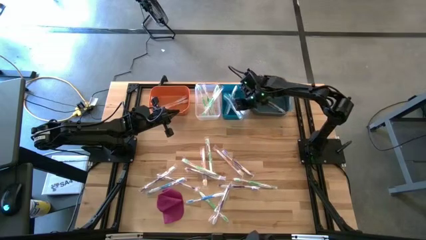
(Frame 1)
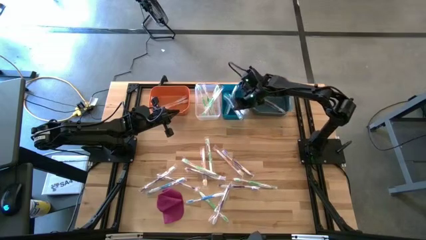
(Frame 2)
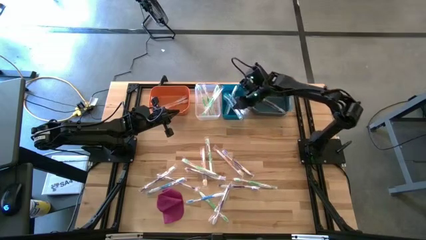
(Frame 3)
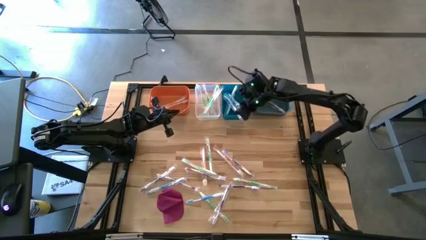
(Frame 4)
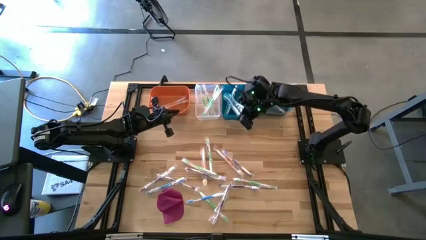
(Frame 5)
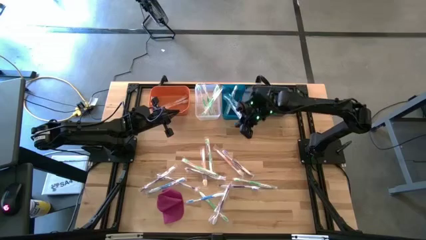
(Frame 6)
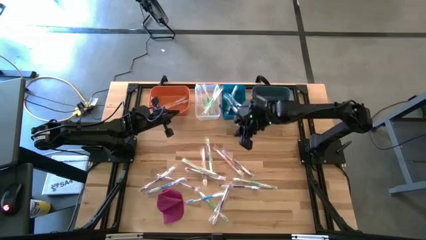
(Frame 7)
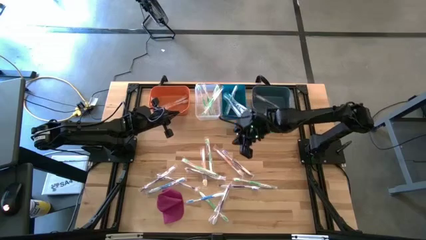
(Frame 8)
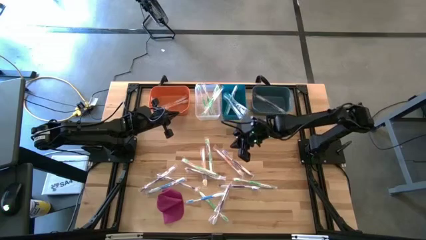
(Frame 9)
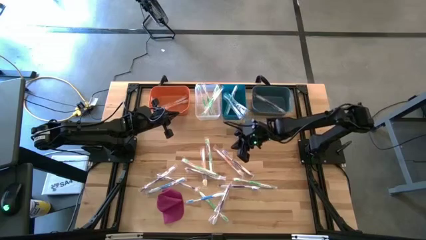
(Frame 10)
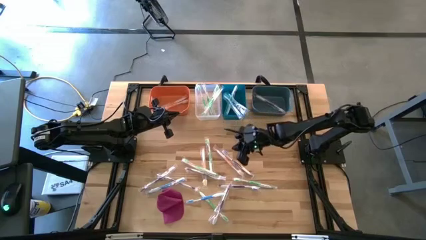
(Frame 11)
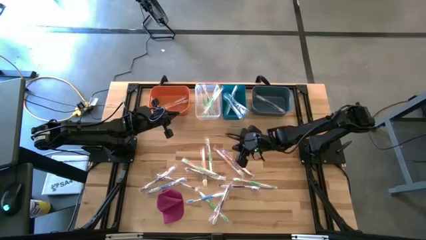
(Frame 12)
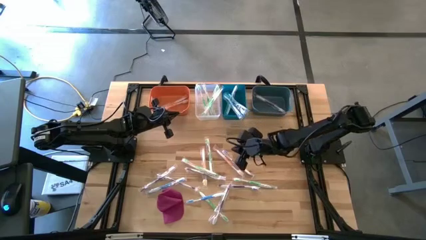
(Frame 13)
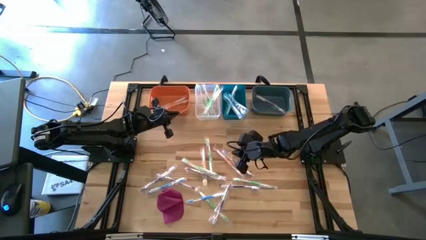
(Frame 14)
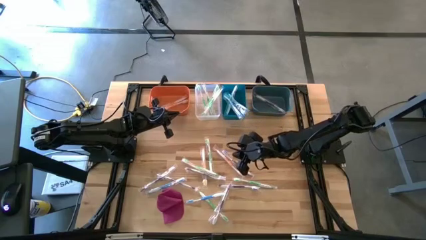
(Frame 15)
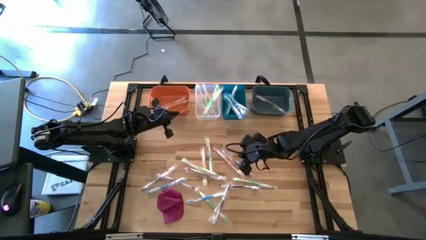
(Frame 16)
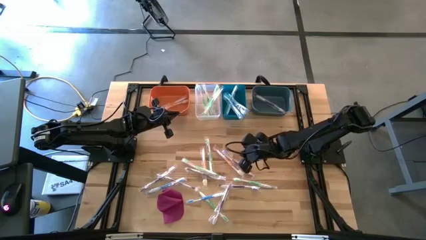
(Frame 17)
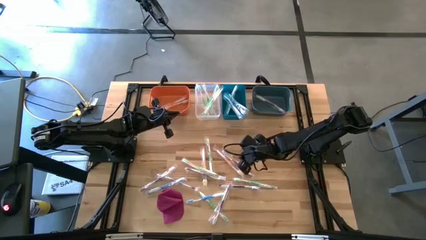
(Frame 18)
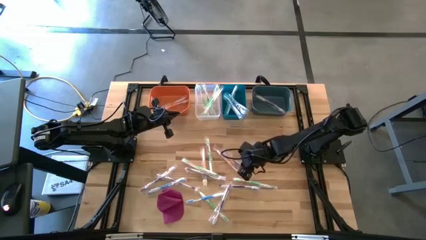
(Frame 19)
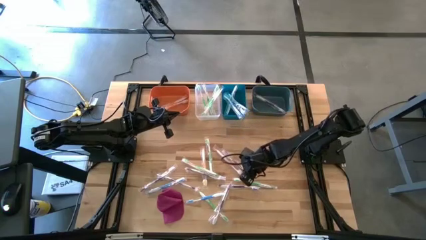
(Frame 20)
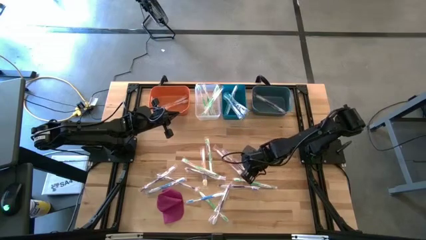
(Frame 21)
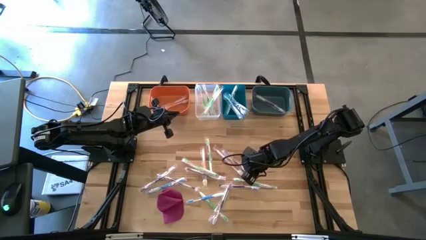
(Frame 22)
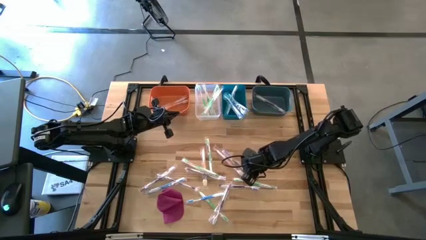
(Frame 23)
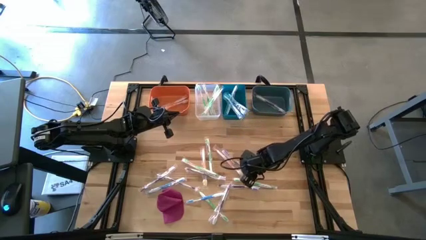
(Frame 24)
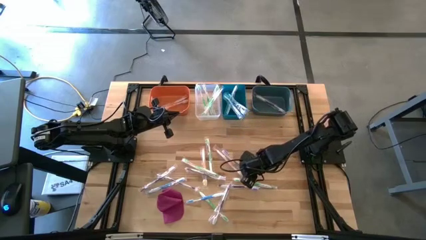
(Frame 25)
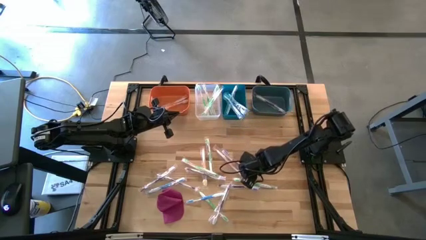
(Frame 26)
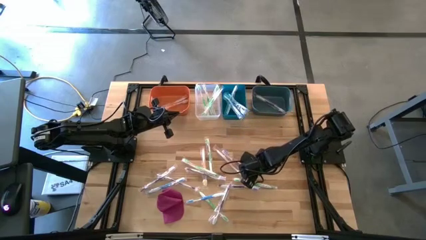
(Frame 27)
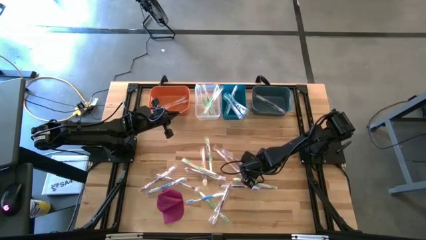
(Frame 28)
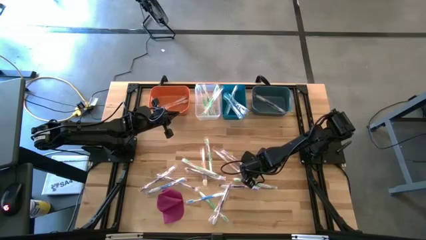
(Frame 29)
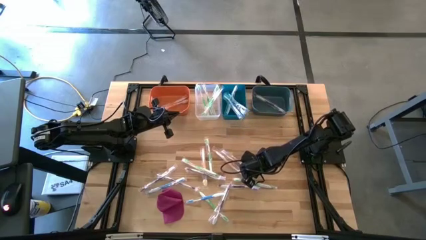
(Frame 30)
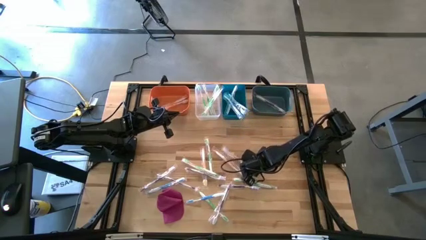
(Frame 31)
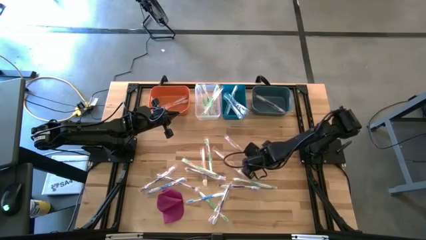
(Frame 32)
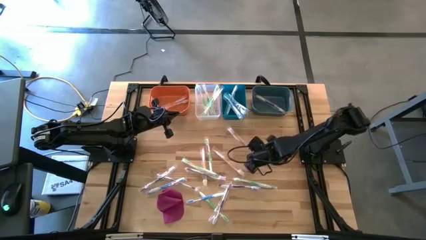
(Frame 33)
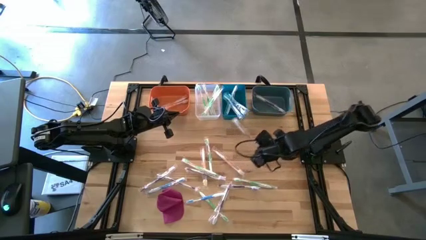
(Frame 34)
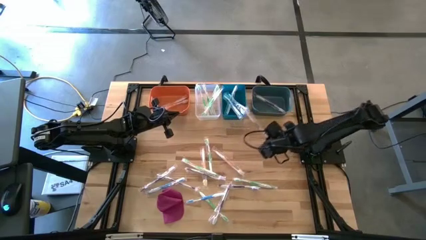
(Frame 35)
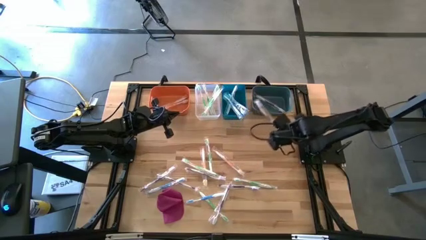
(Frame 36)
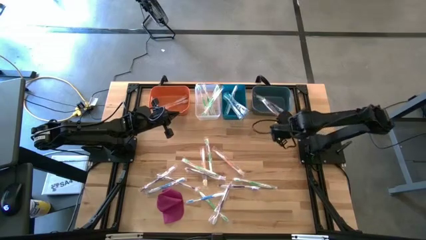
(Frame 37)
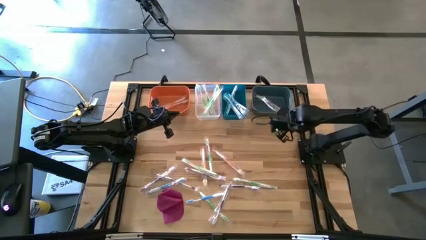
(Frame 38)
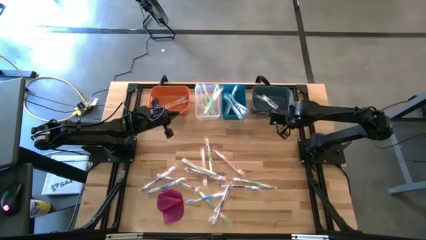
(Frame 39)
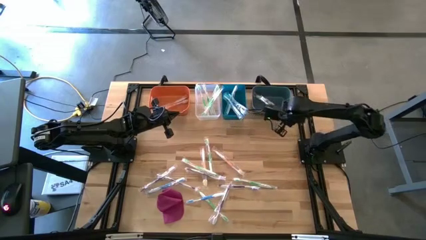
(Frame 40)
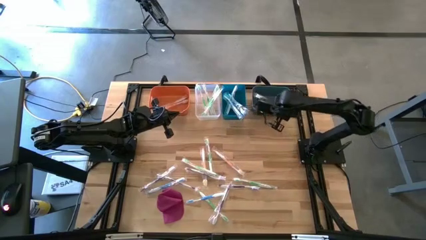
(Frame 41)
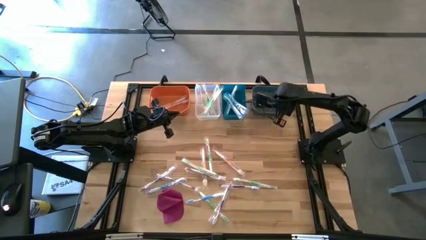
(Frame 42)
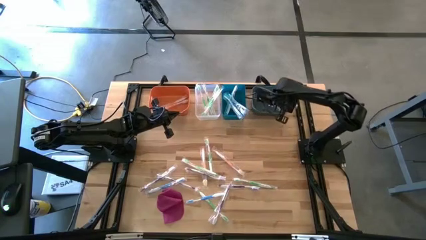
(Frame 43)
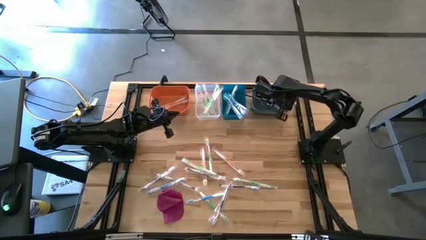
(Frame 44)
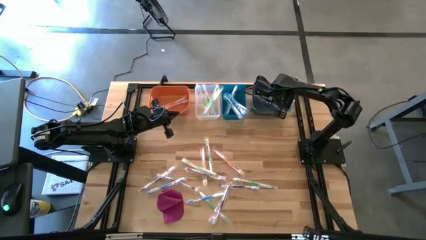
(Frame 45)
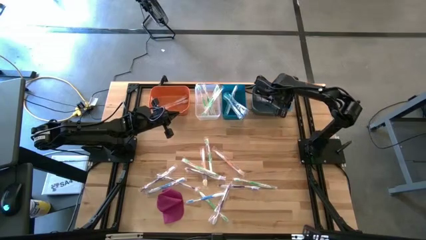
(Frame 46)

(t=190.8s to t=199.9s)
Task: Pick & Place Toothbrushes
Put the purple toothbrush into the green bin

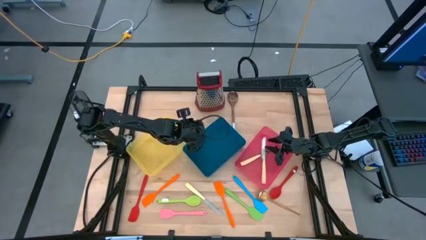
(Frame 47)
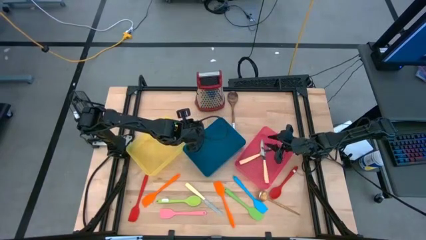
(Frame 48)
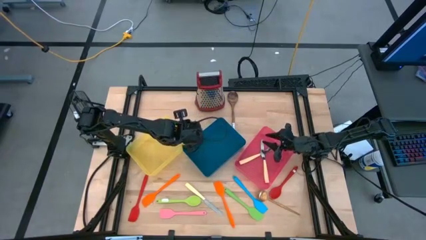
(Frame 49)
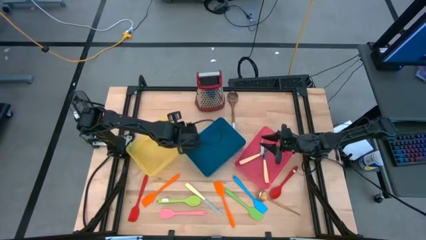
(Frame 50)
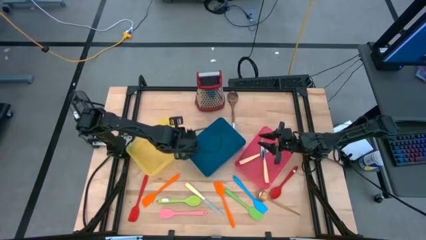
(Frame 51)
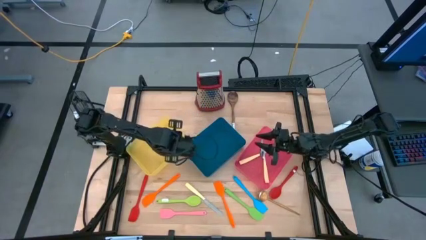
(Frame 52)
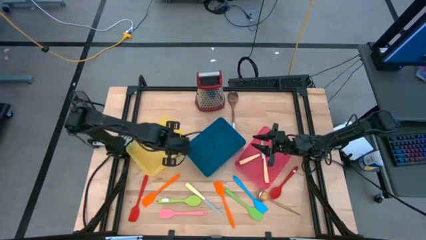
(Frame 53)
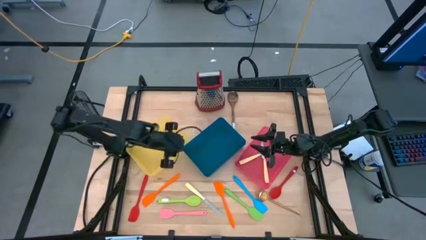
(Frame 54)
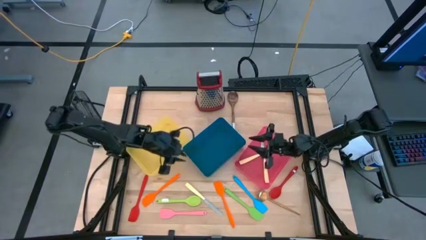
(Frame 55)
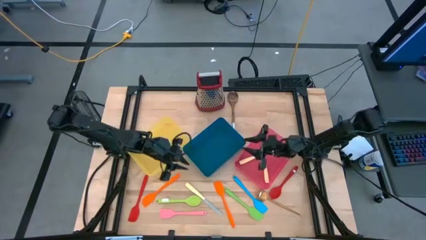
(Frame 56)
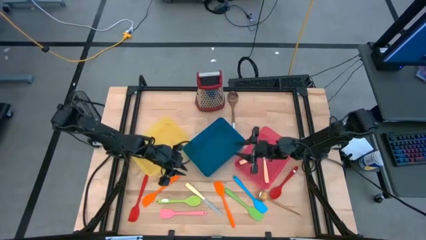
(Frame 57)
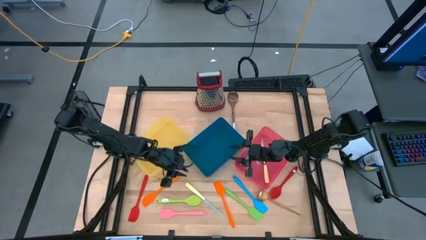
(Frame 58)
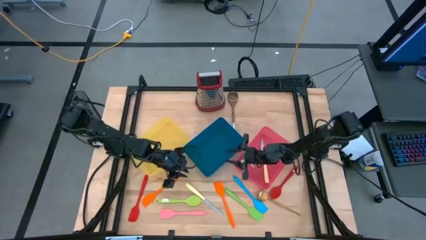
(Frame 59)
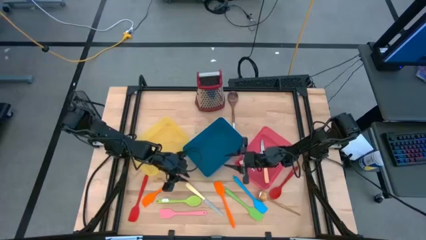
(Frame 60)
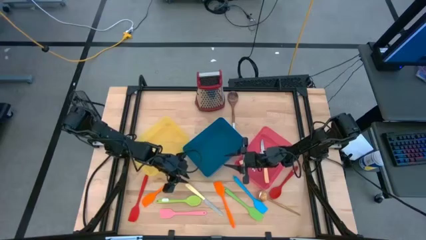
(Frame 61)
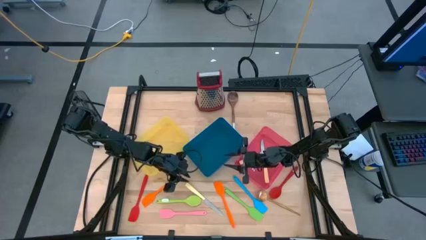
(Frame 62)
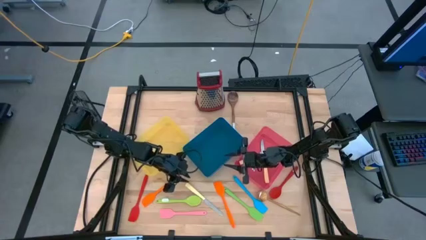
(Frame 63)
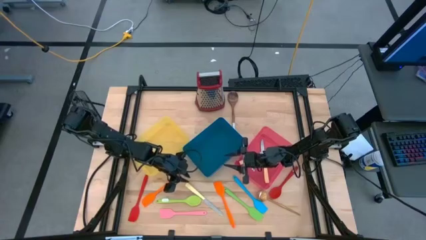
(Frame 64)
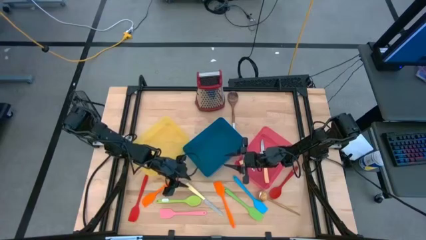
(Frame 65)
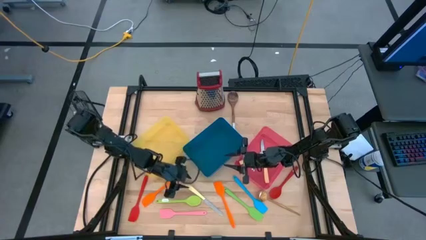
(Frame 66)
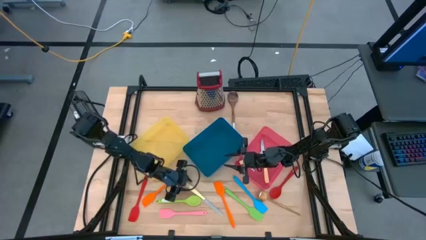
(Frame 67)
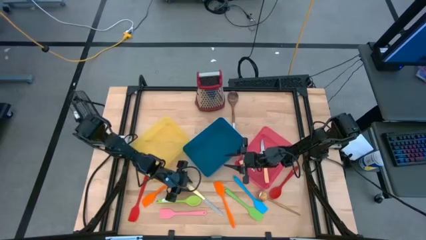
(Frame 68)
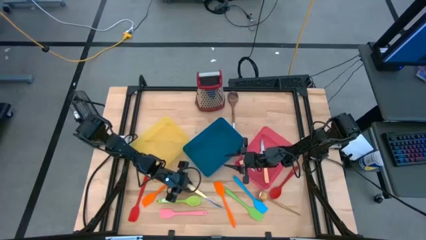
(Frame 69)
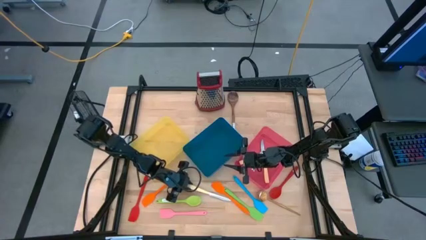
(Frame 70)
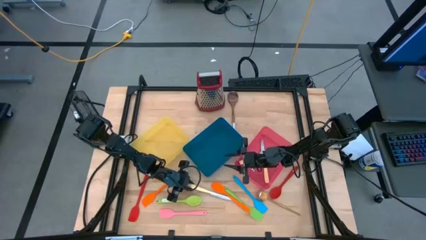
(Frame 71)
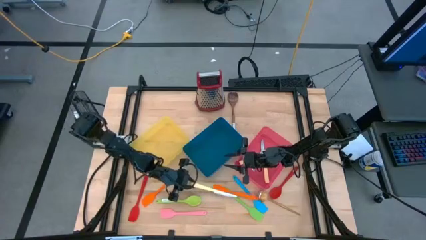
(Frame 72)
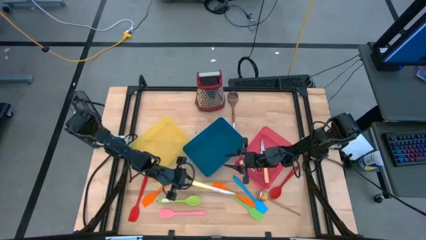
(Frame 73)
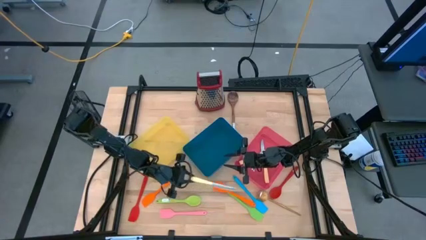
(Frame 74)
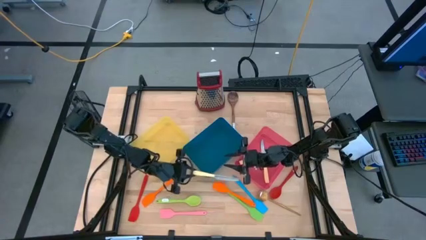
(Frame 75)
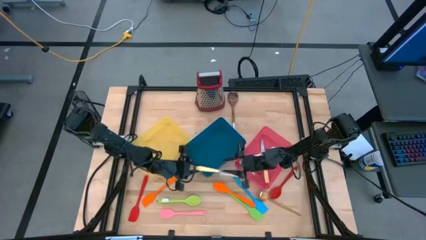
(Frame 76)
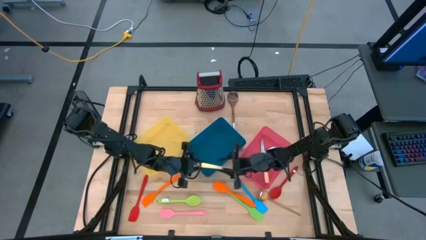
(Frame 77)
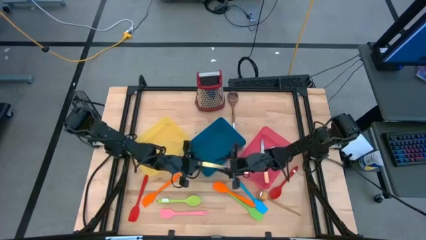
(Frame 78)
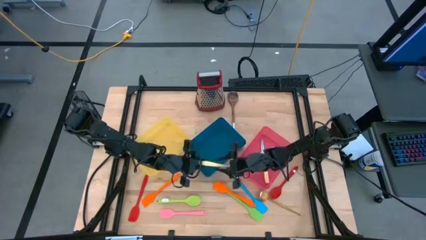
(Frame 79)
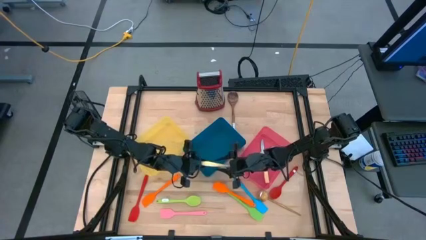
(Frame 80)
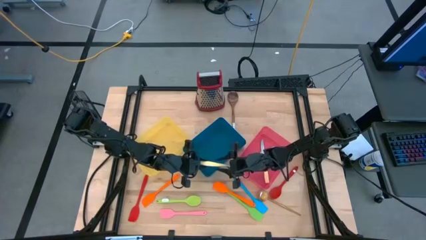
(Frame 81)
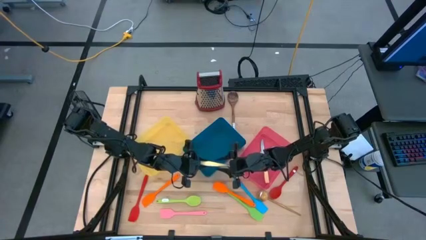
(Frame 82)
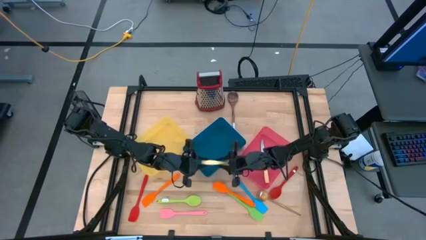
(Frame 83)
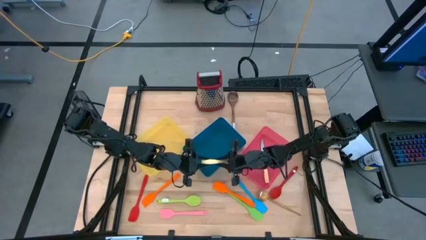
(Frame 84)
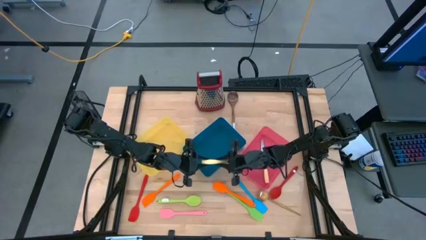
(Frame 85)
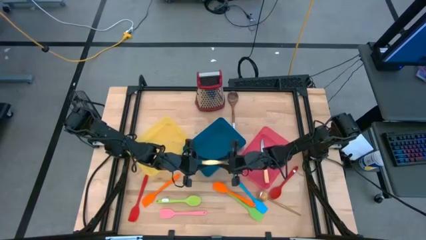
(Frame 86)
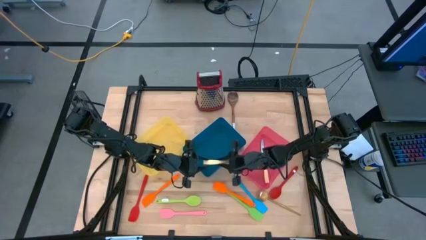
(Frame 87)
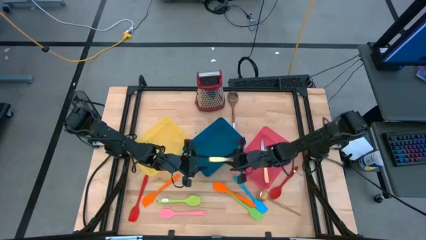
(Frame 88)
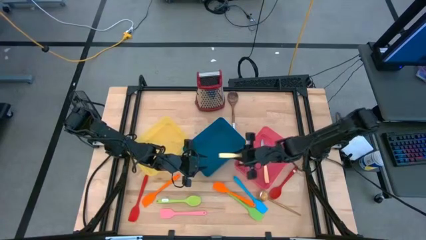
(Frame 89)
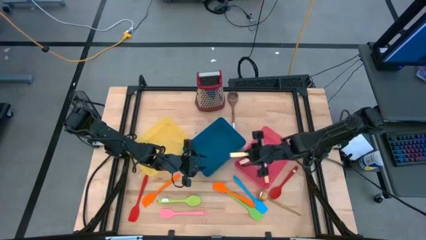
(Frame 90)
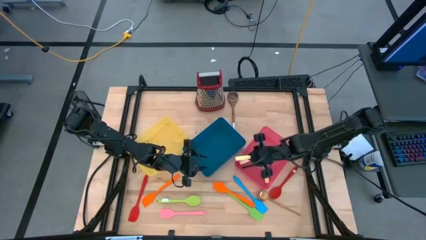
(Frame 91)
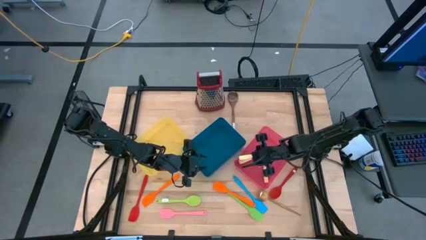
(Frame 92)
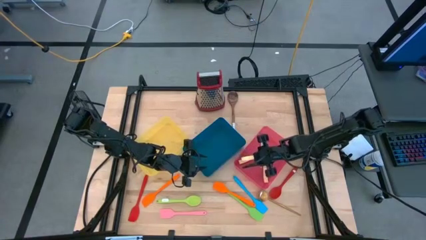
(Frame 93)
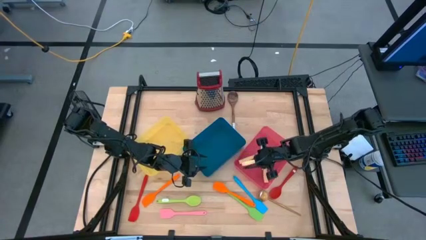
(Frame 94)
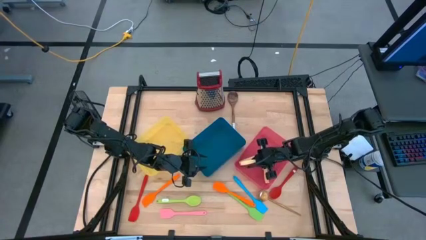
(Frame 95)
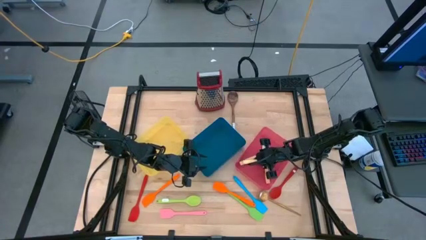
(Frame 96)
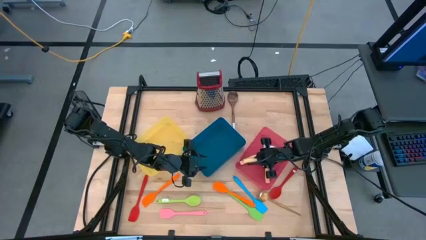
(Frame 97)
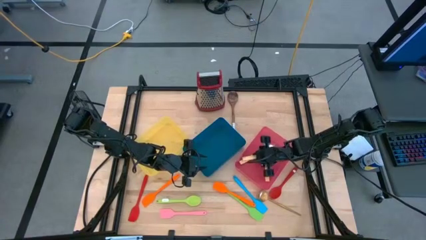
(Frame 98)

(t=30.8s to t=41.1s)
Task: Pick & Place Kitchen Items
Put the yellow table knife into the red bin
